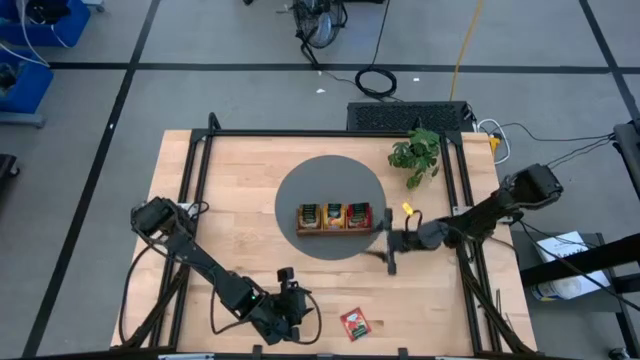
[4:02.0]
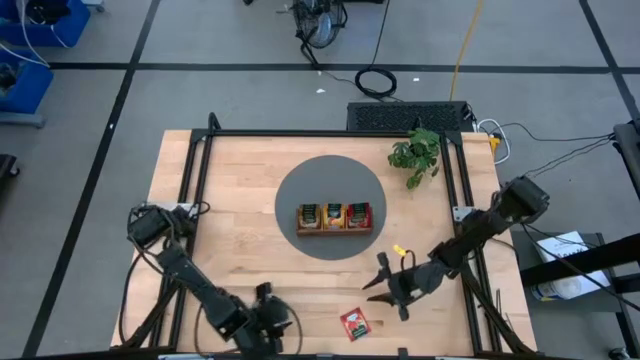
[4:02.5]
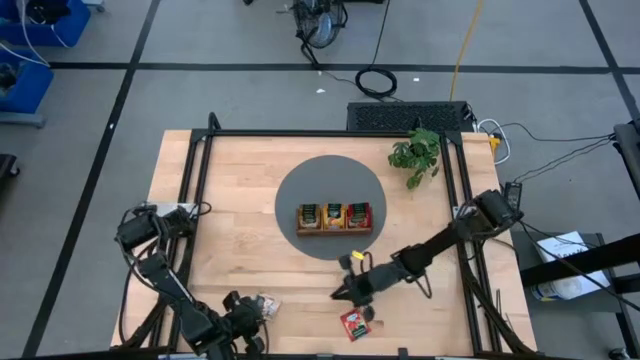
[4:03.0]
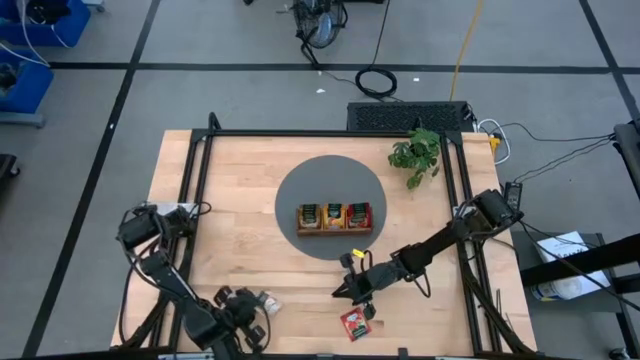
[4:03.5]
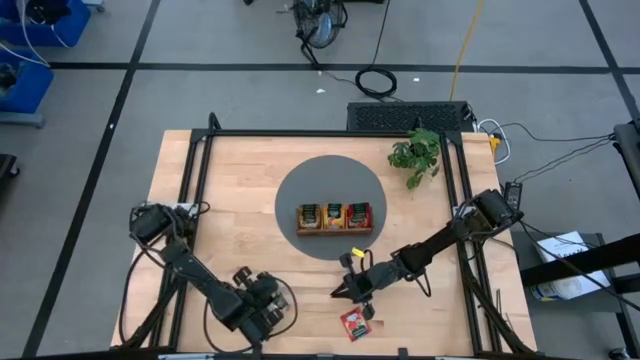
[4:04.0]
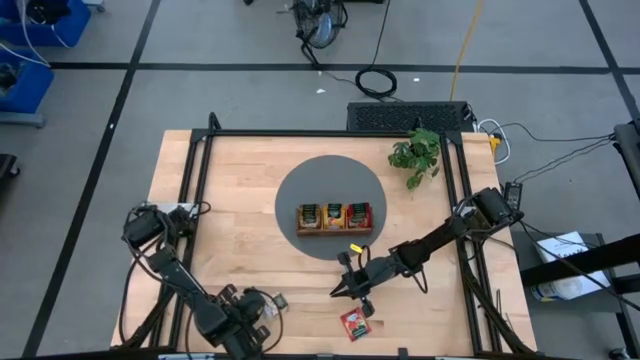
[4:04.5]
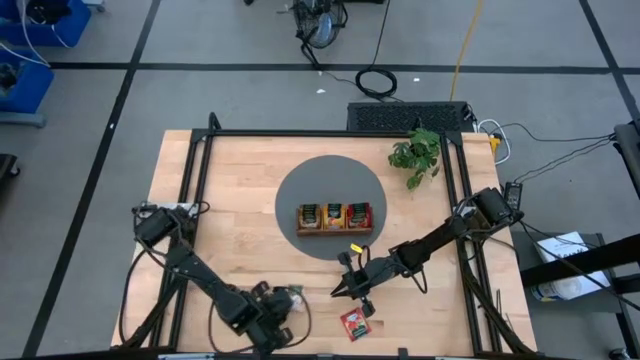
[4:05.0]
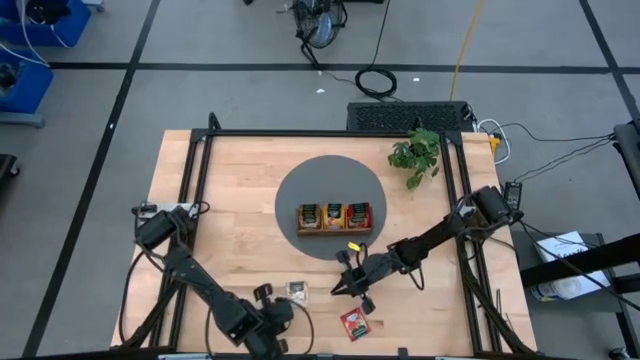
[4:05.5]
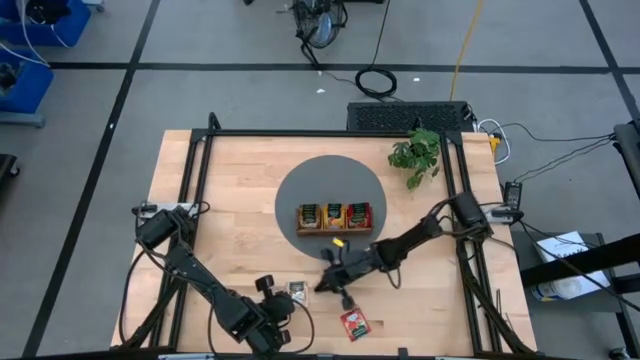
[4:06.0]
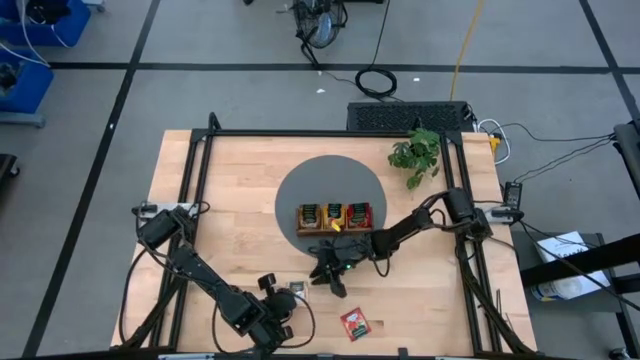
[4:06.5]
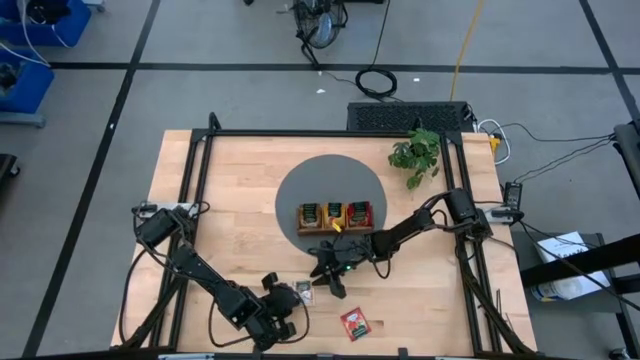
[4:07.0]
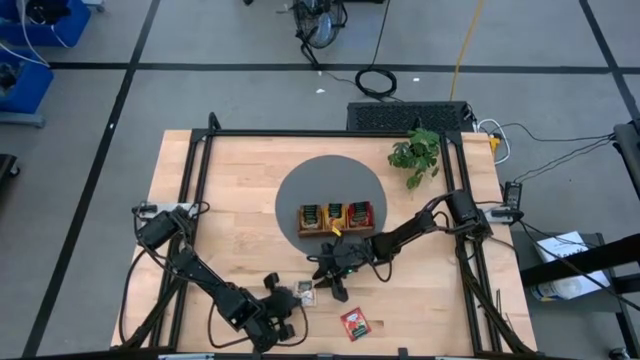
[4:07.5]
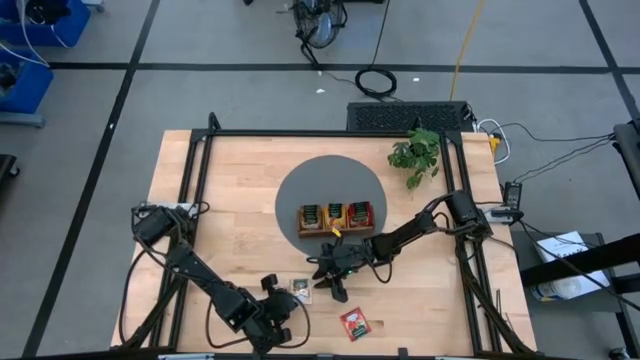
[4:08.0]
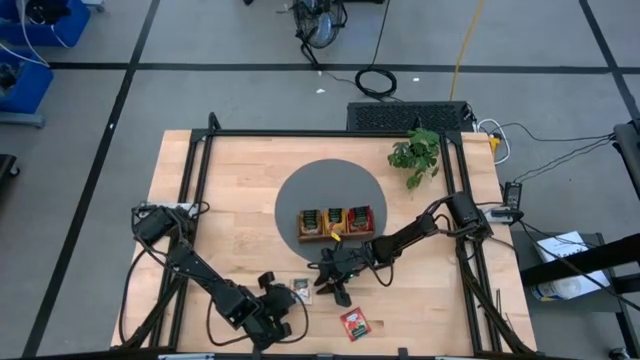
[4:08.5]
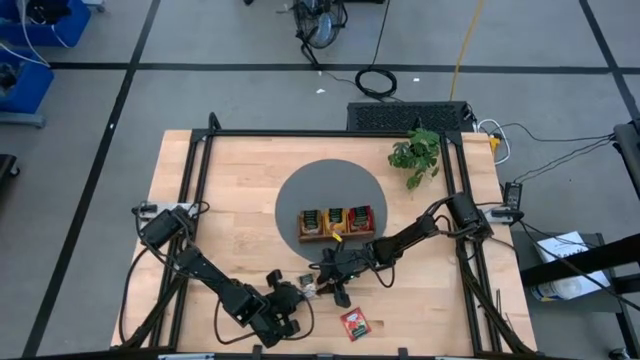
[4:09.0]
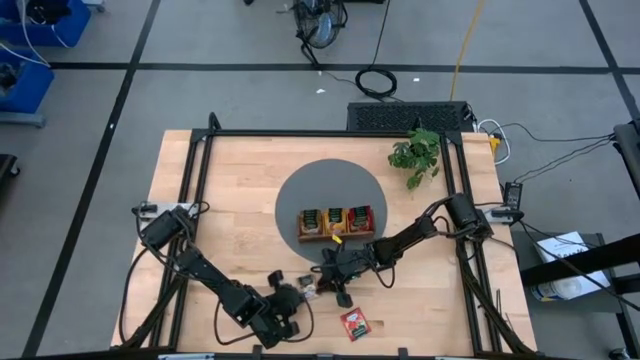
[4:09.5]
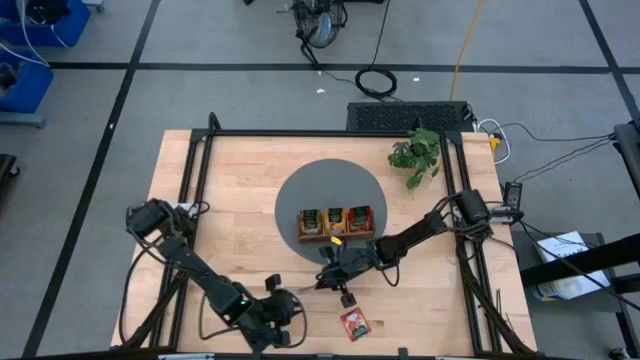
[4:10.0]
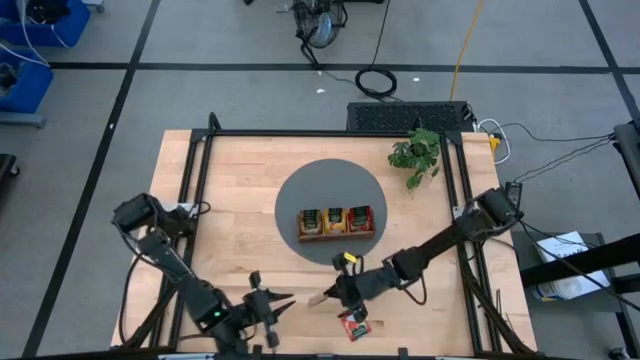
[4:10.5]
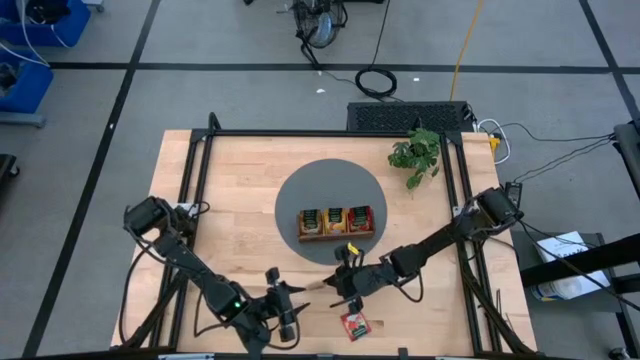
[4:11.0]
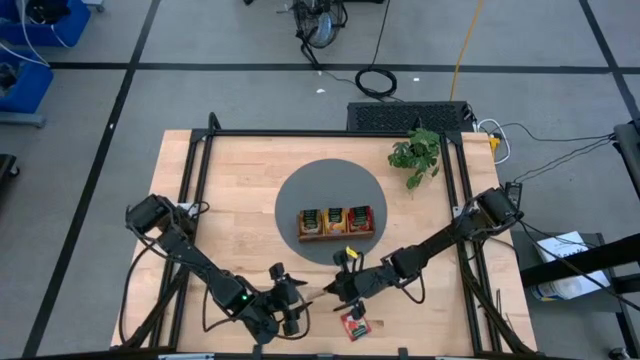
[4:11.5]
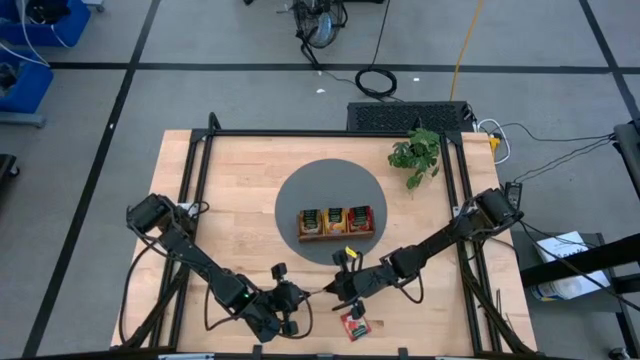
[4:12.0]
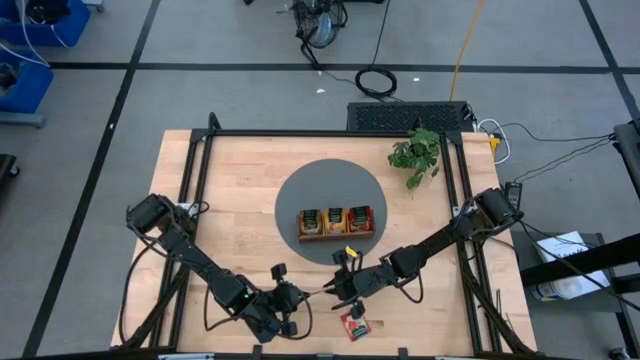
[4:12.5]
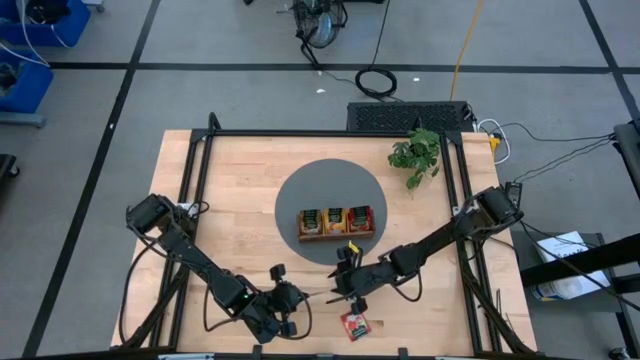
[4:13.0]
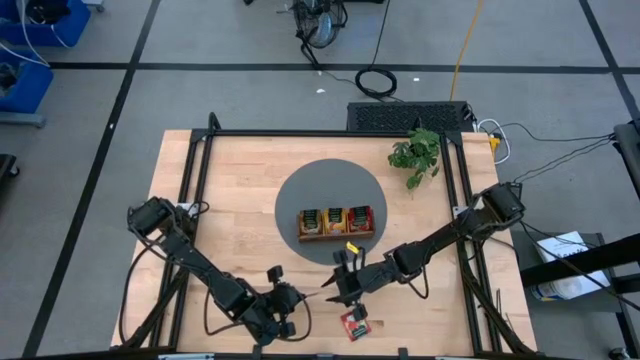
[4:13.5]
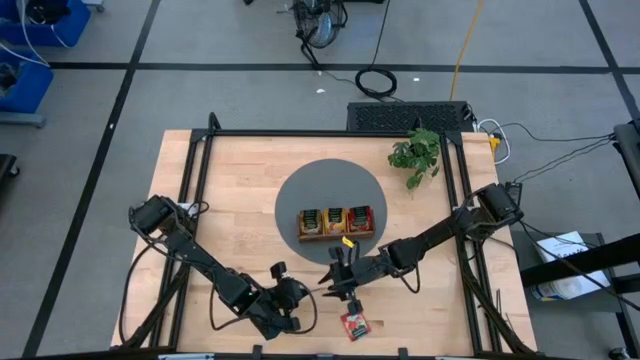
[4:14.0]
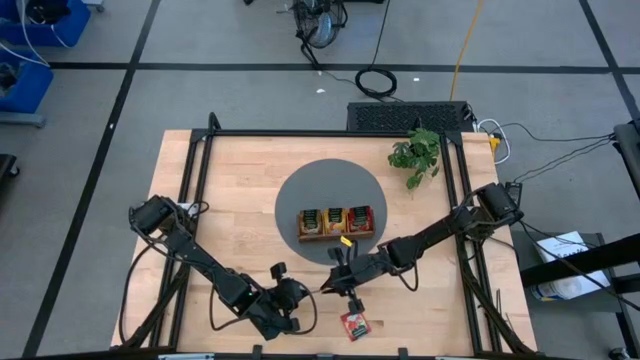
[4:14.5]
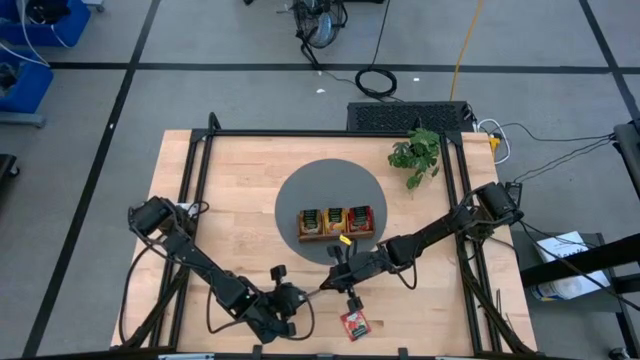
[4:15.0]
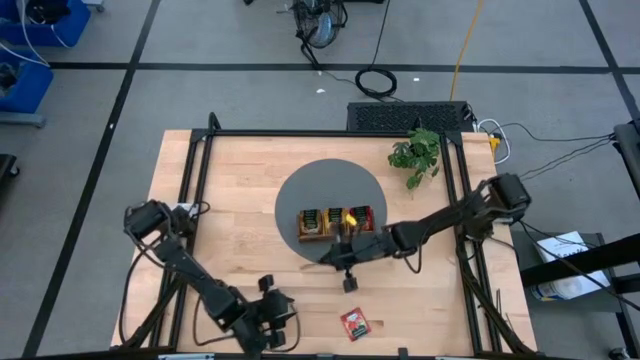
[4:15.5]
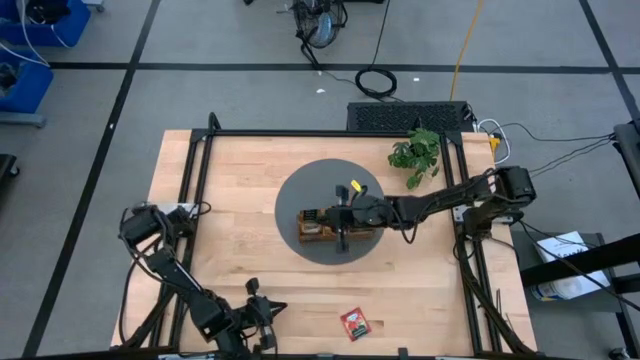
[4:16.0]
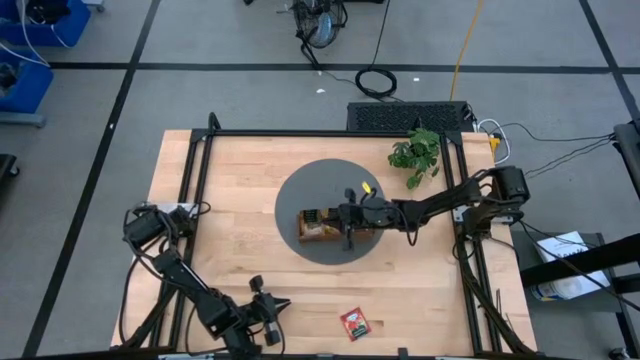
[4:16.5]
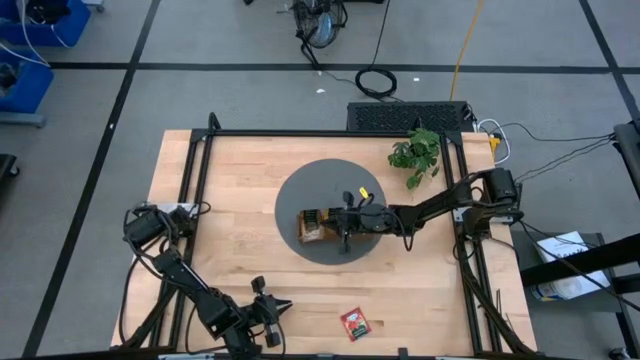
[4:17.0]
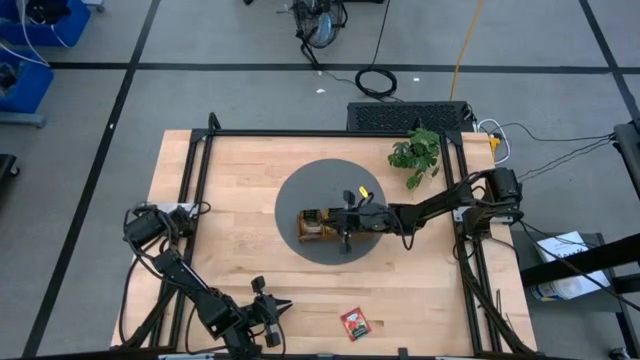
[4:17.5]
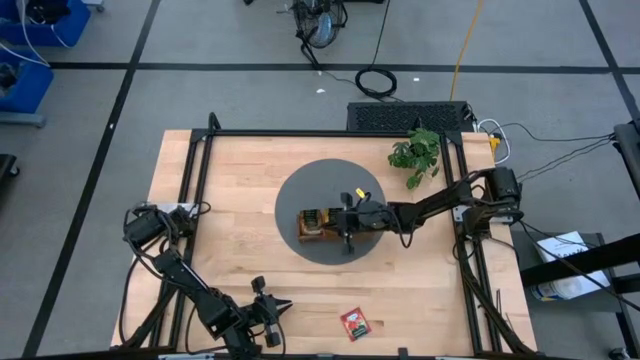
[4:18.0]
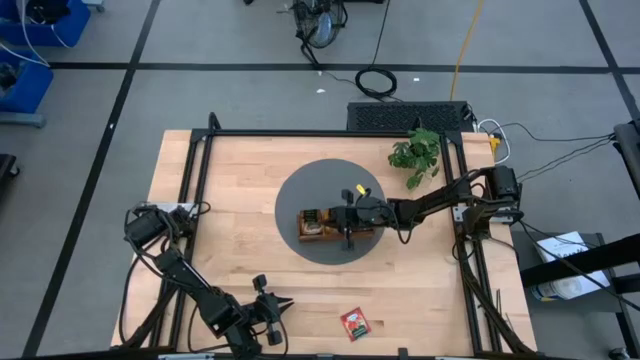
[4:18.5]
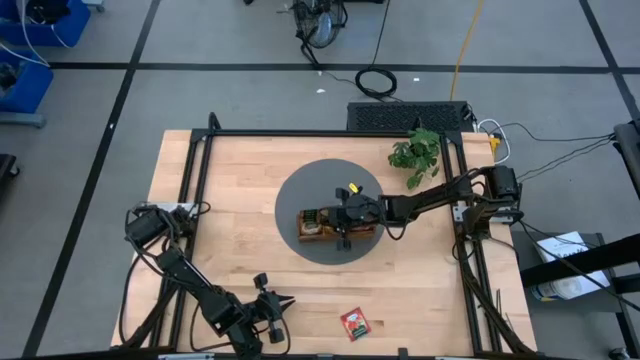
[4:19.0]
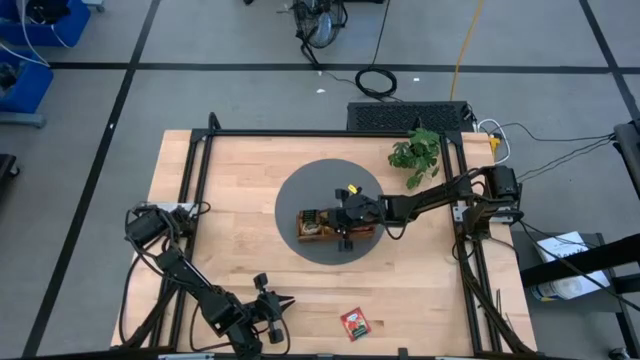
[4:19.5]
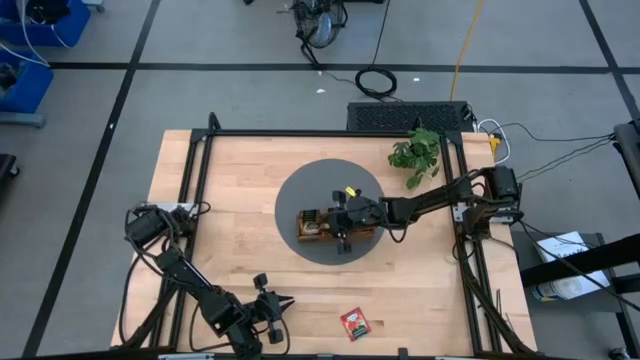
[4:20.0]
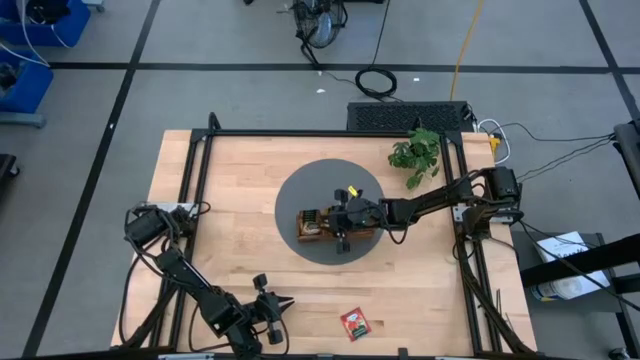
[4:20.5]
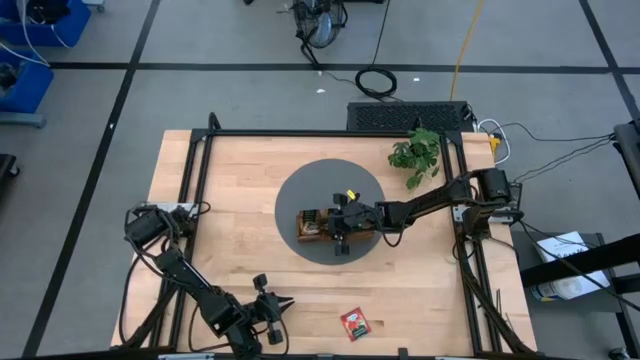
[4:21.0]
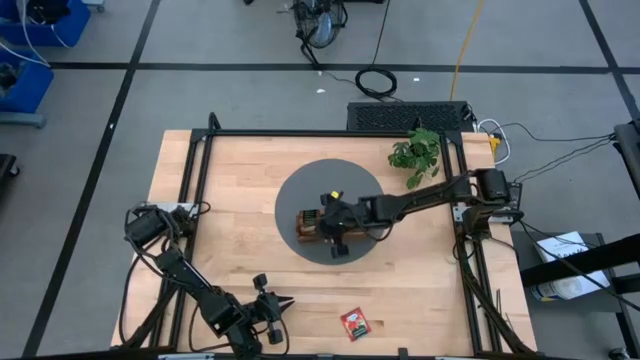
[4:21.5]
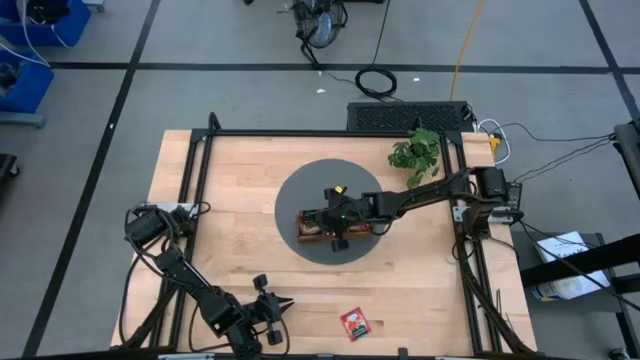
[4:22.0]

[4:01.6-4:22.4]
Task: Pick & Place Tea
Put the cinnamon tea sachet into the left compartment of the wooden organizer

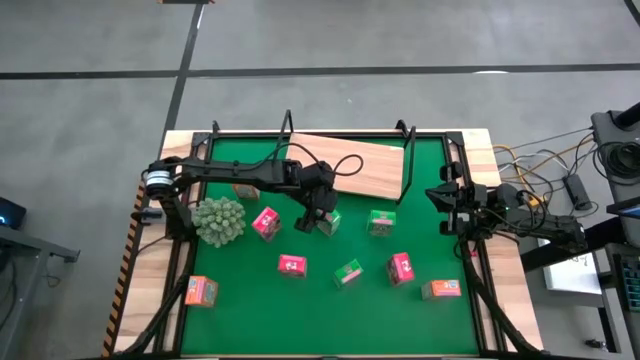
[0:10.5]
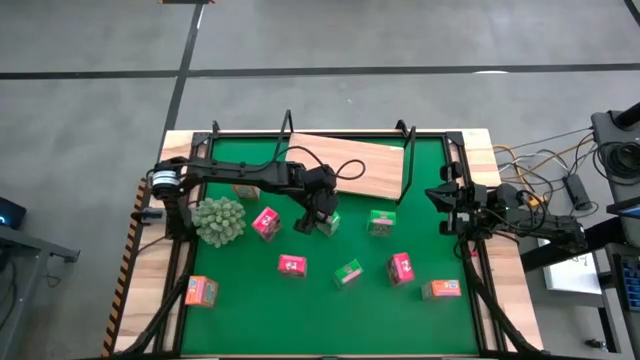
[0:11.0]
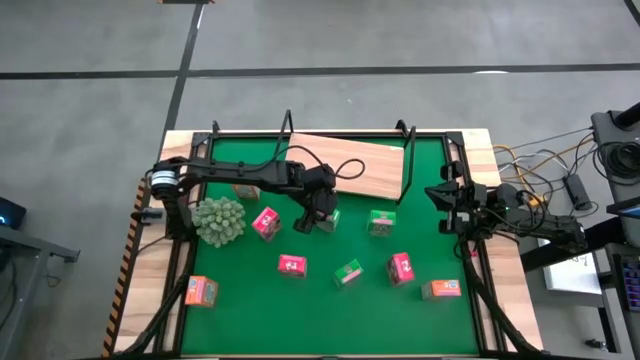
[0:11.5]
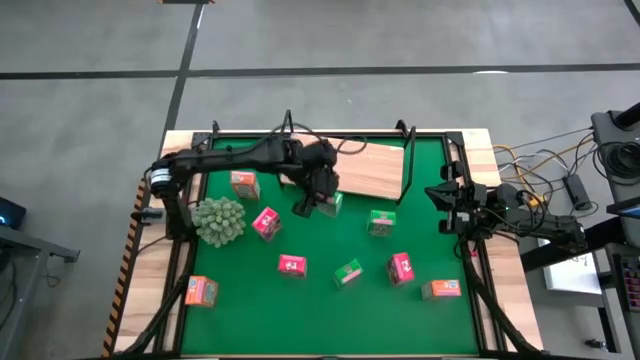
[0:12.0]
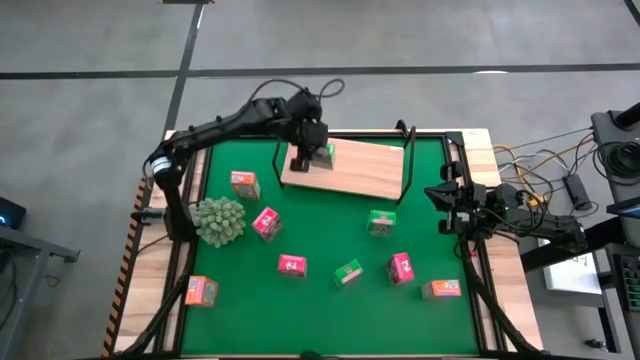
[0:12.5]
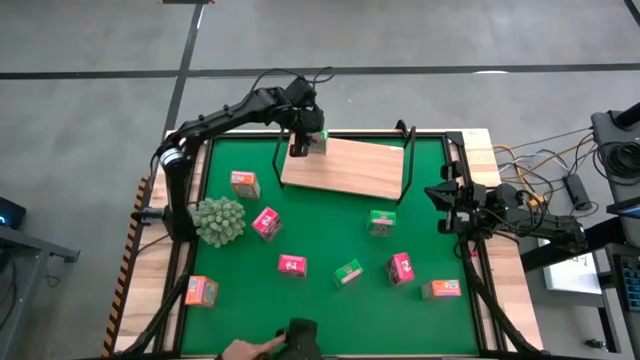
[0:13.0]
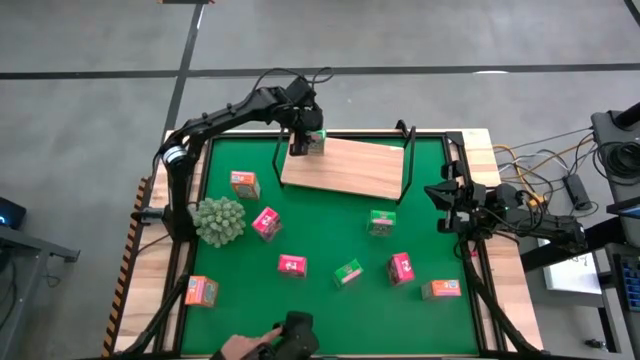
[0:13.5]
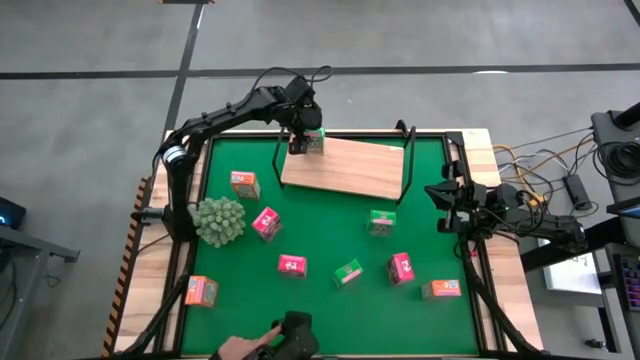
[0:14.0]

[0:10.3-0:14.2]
Task: Stack cereal on shelf
Put the top left green cereal box on the shelf
